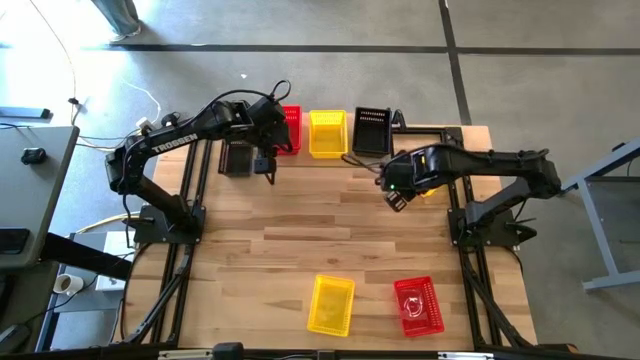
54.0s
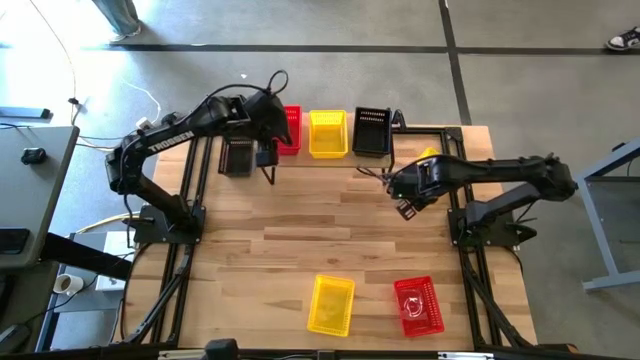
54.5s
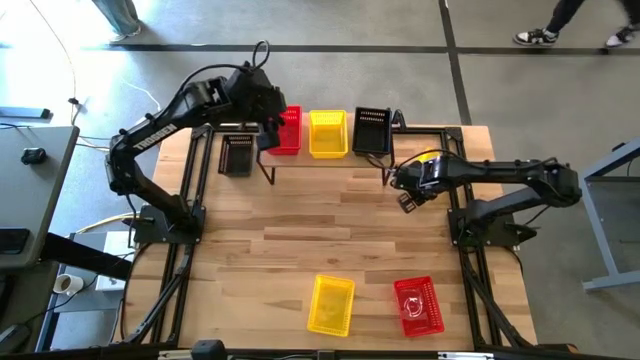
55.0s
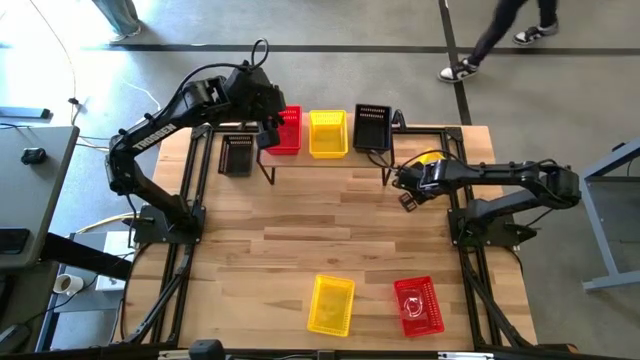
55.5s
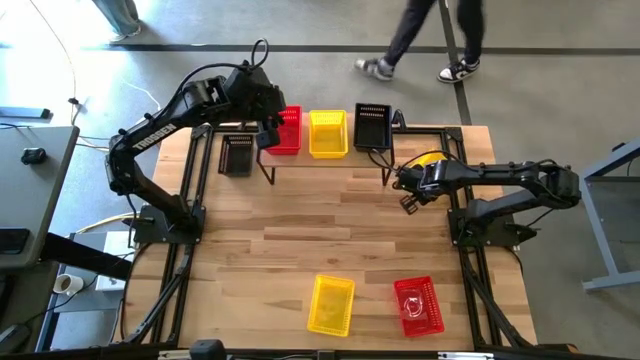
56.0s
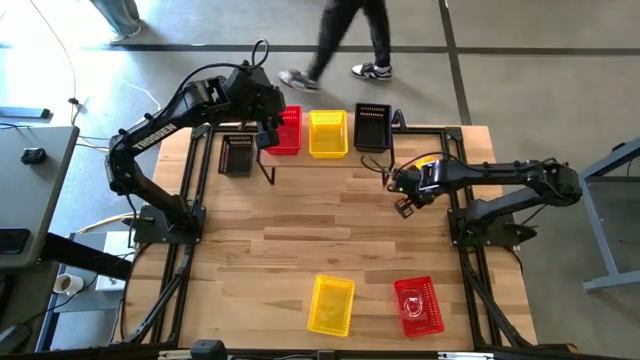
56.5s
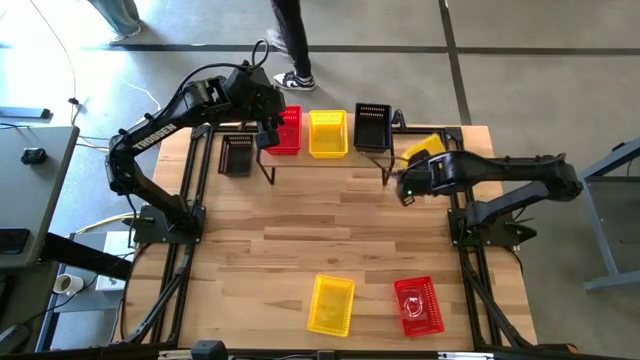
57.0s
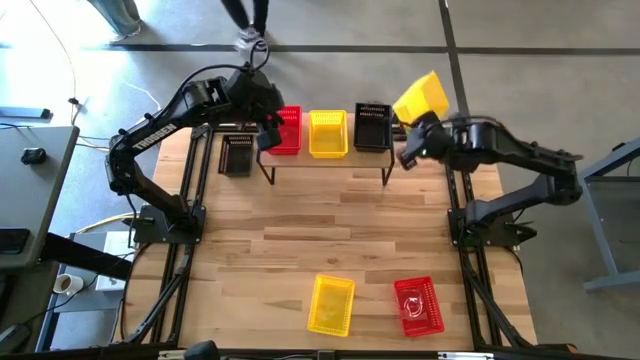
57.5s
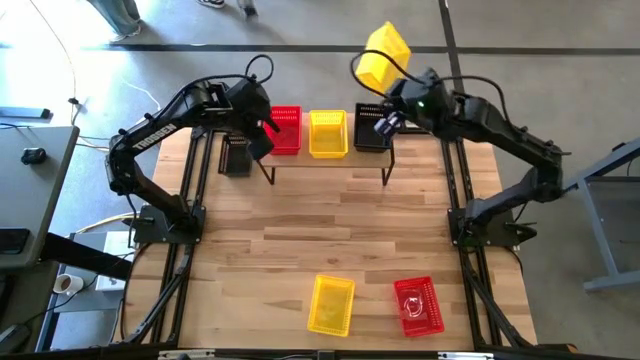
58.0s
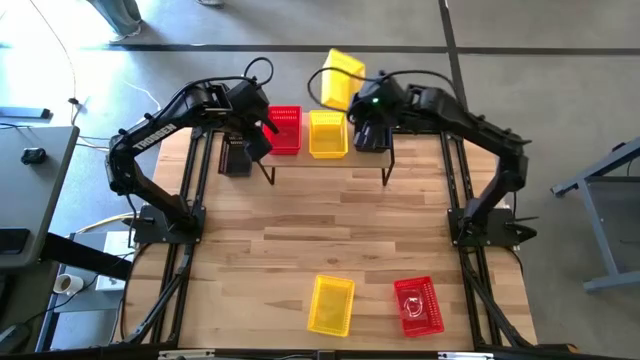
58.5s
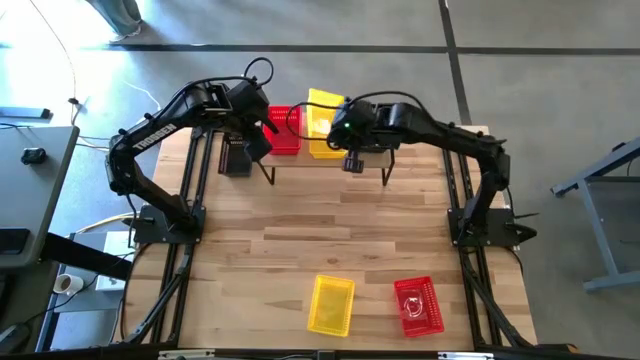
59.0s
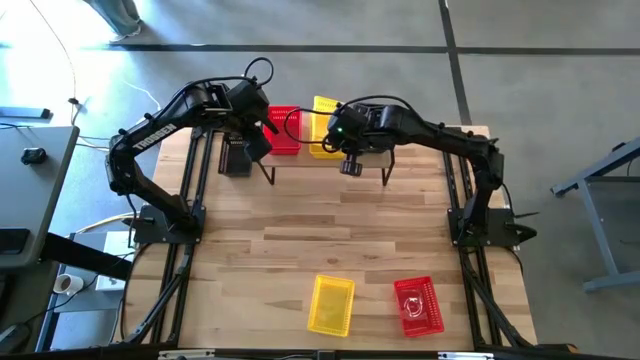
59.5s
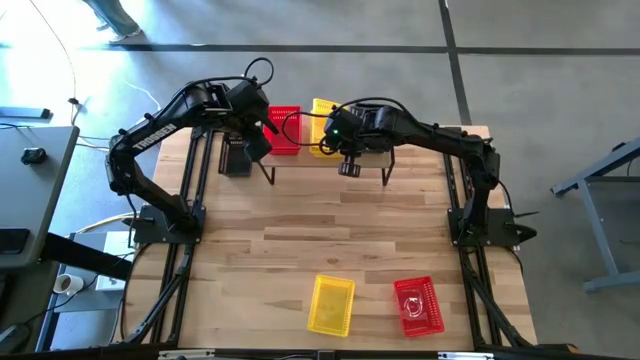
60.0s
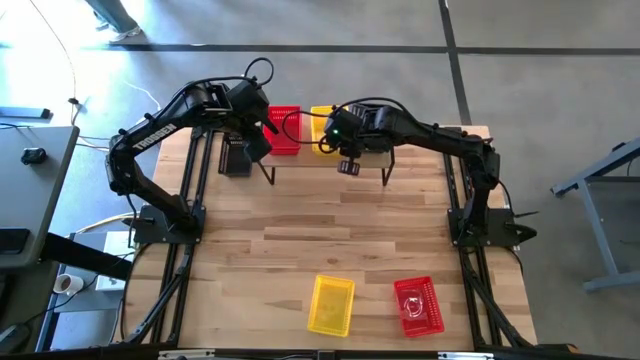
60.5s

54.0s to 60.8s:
Task: Stack baskets on shelf by color
Stack the top yellow bin on top of the other yellow bin on the shelf

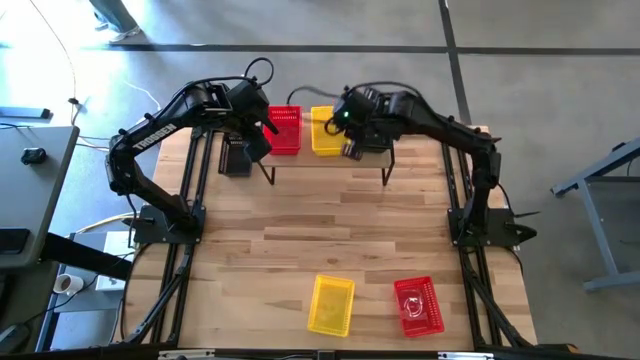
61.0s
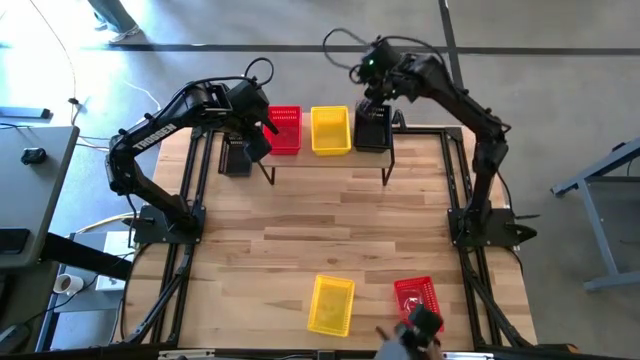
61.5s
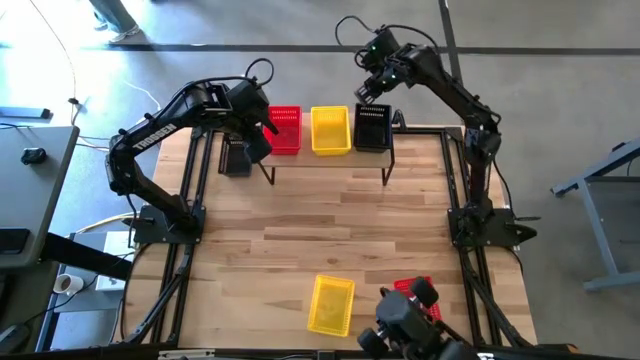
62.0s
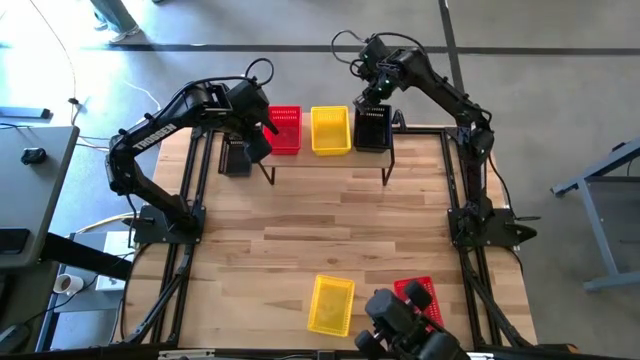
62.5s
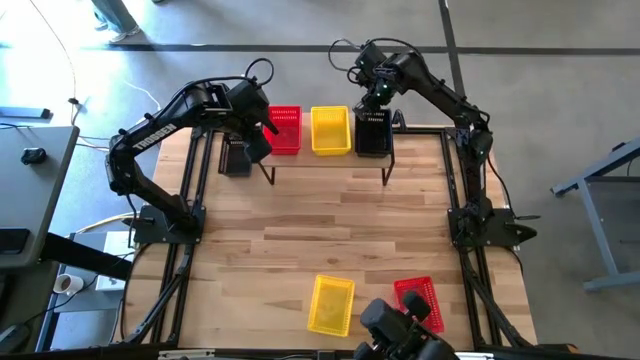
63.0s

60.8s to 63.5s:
Adjust the black bins on the shelf

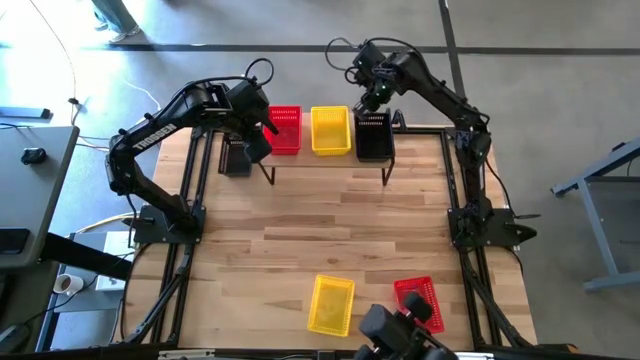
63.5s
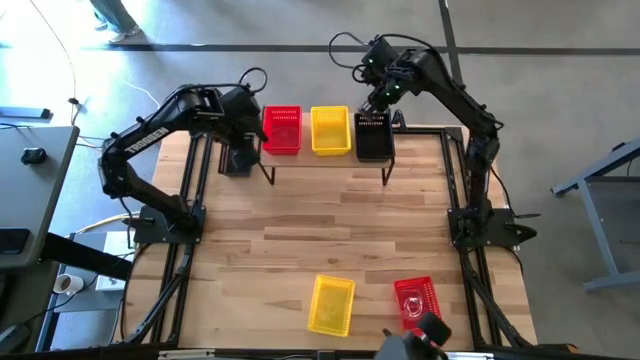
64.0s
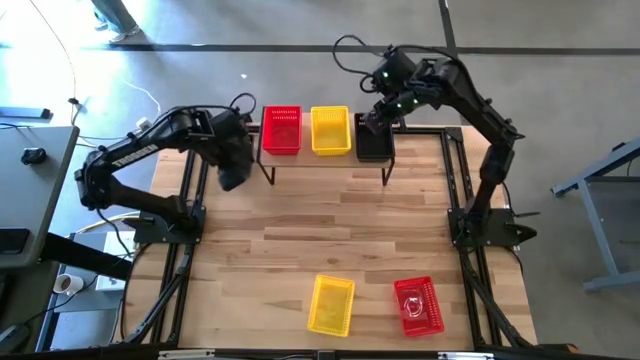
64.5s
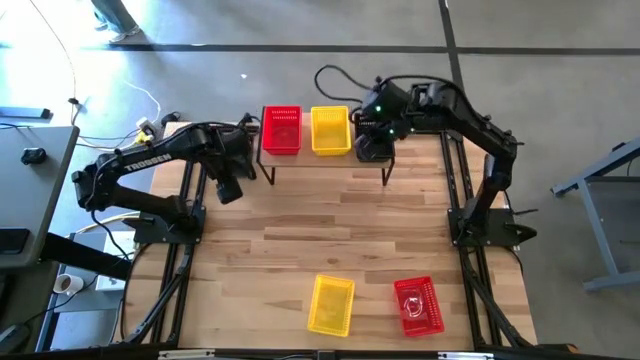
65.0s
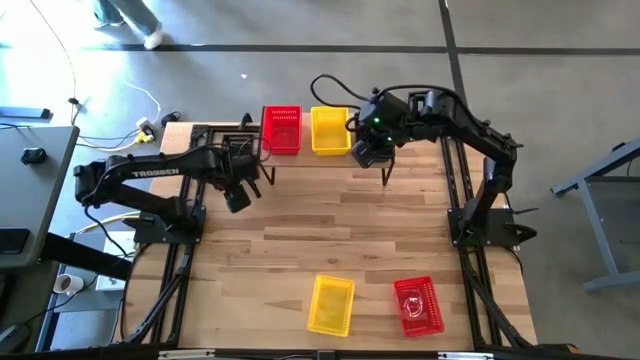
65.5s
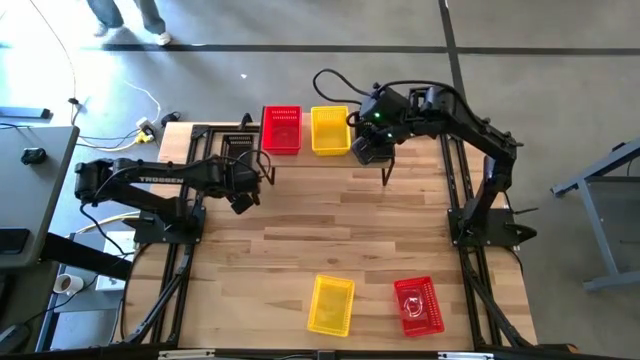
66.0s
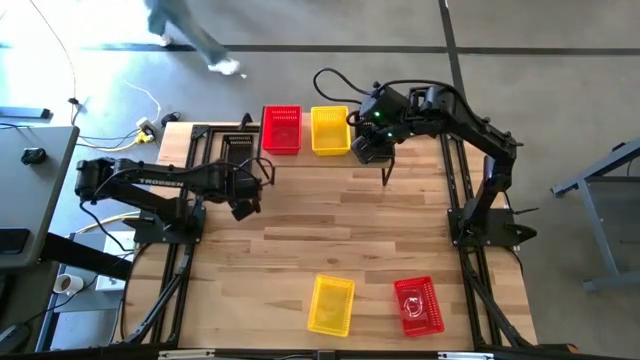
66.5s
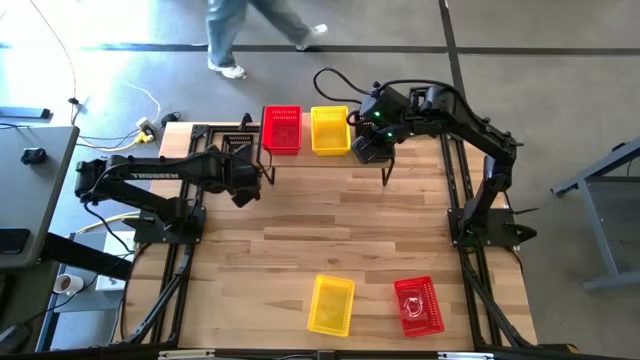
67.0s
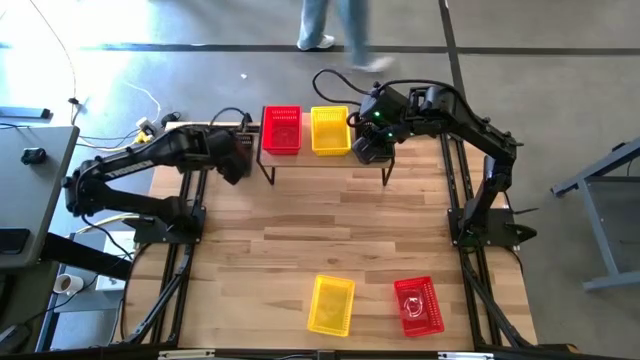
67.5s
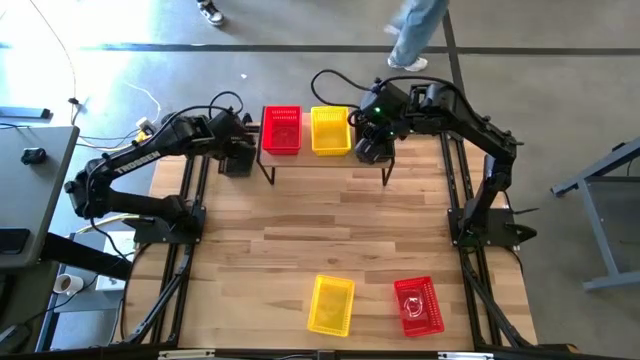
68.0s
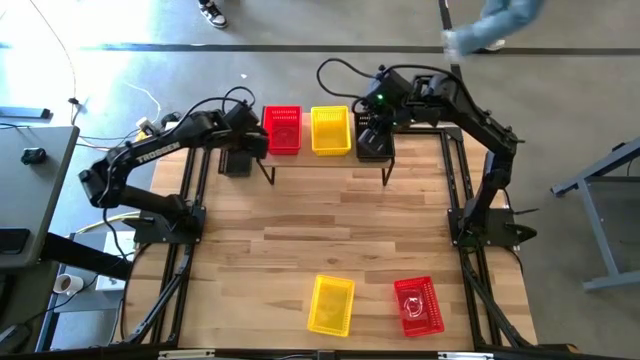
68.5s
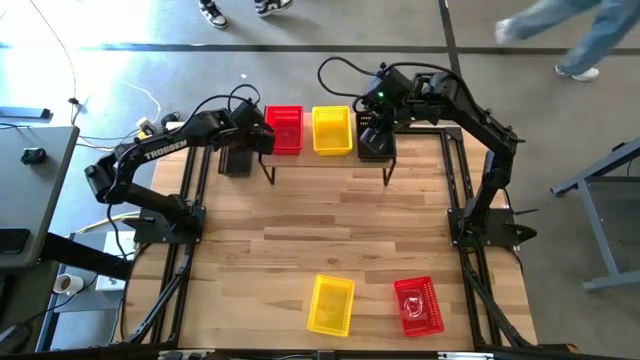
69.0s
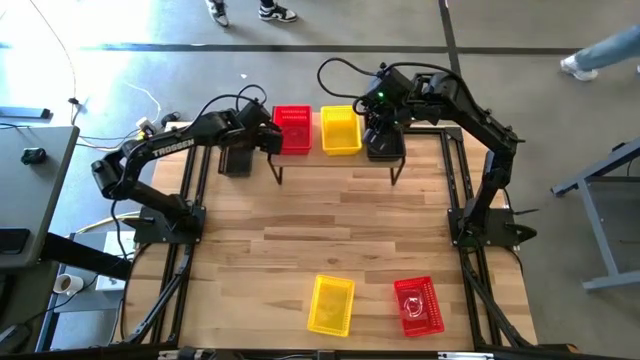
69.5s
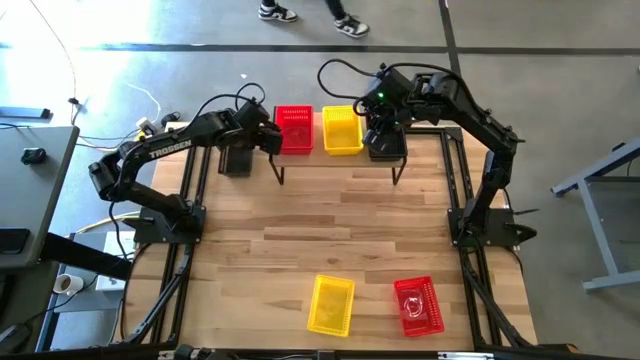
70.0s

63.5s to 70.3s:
Adjust the shelf

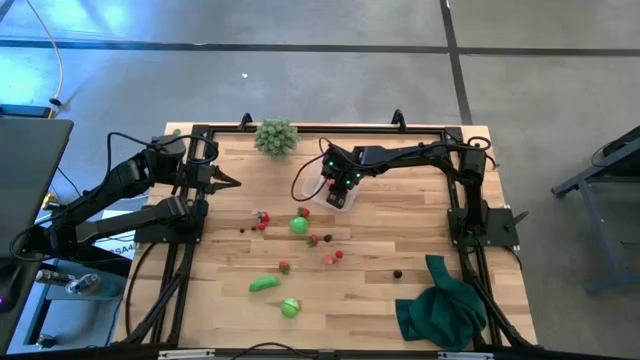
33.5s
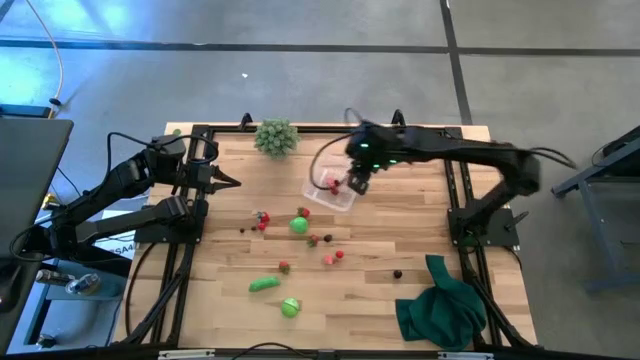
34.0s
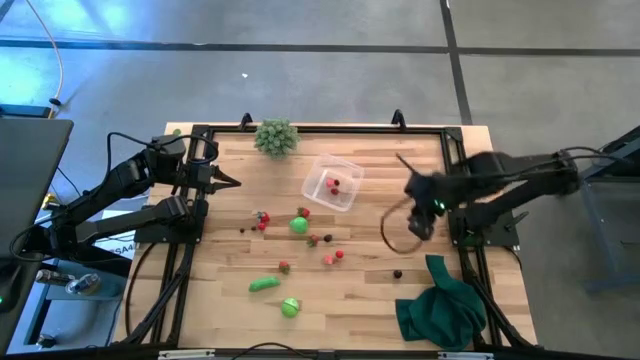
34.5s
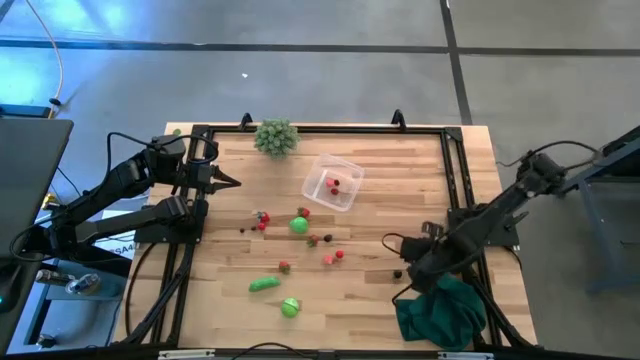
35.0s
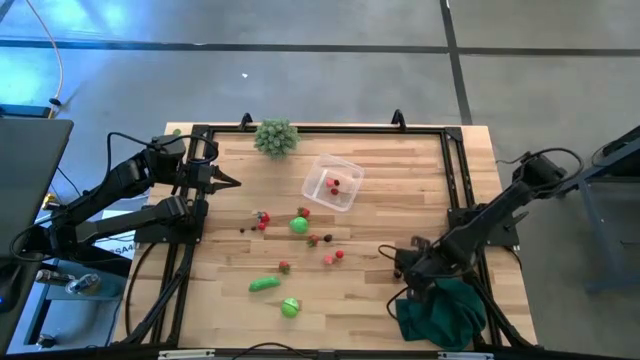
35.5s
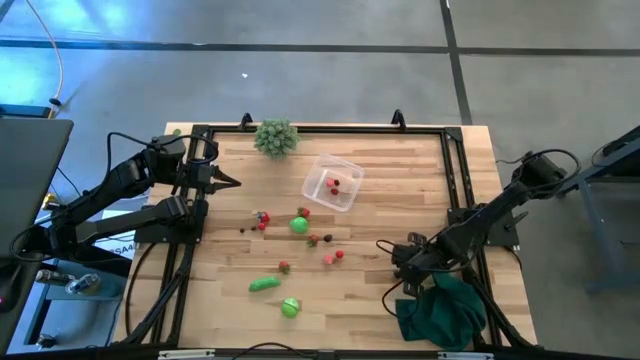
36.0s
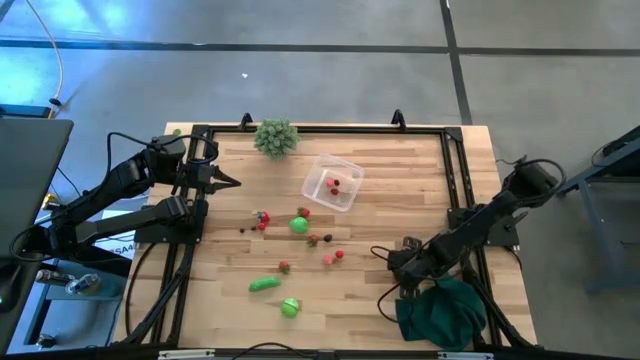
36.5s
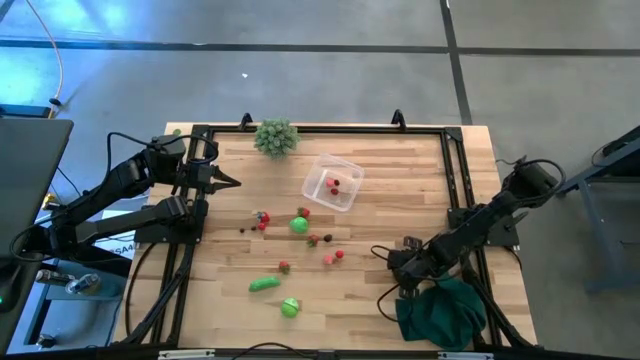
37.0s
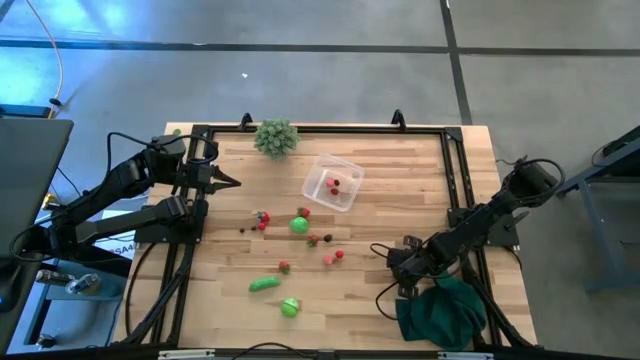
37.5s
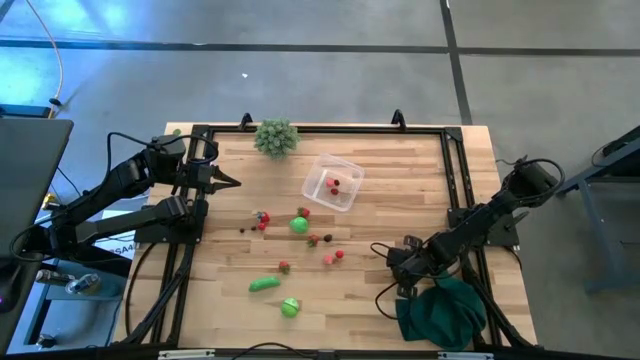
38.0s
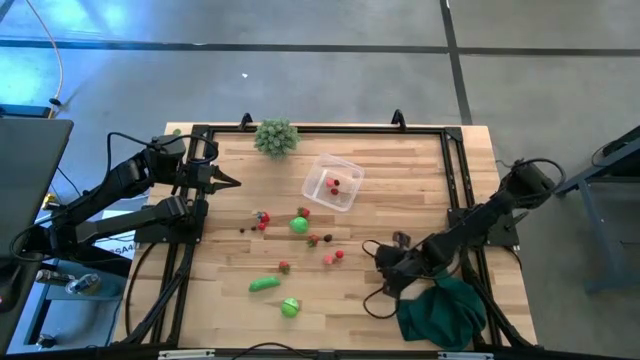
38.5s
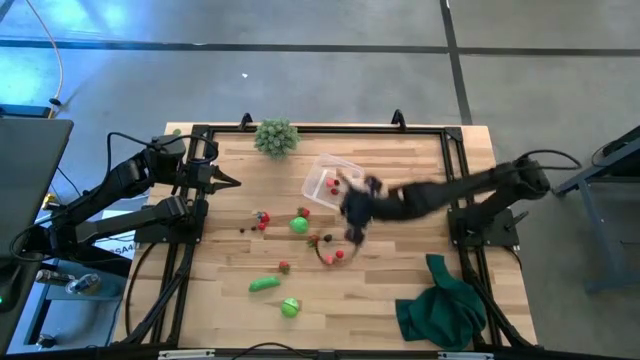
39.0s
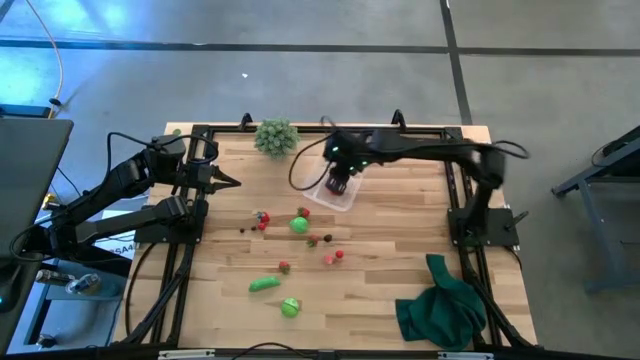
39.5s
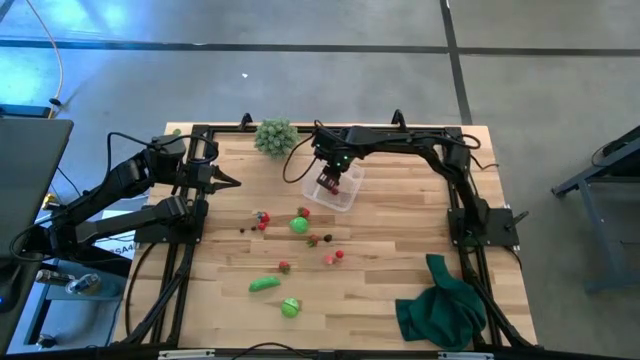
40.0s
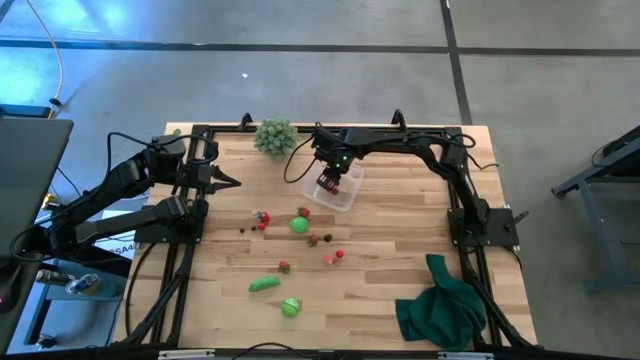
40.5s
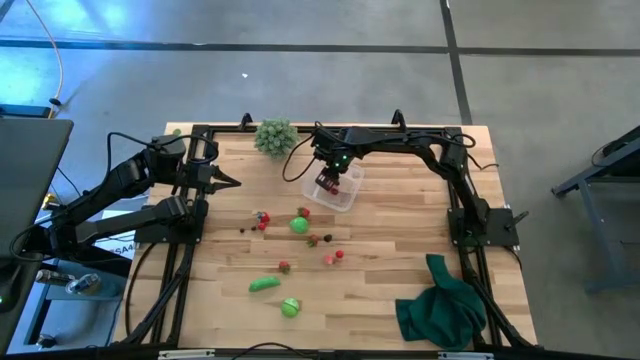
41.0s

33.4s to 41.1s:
Task: Pick and placing Produce into tupperware
Put the black cherry into the transparent container
